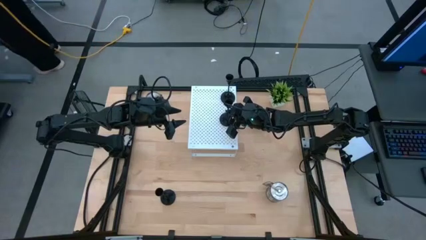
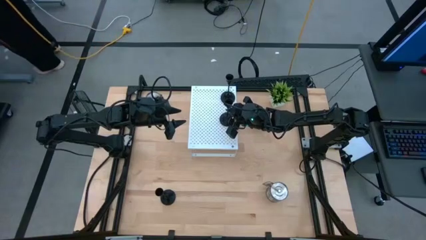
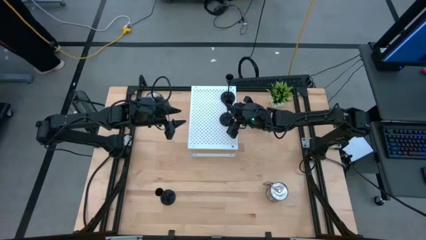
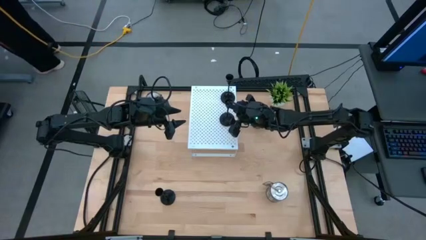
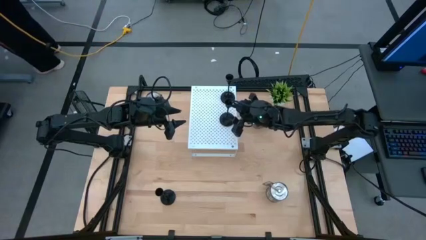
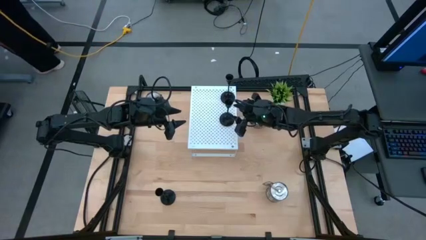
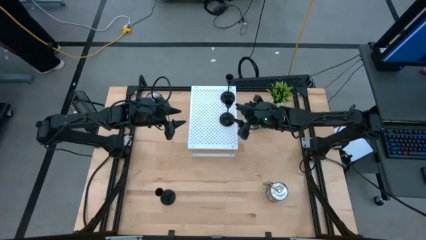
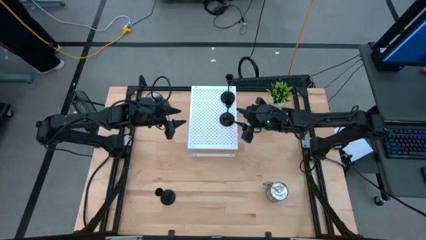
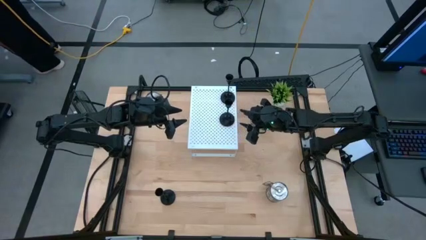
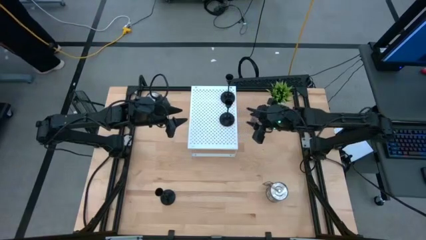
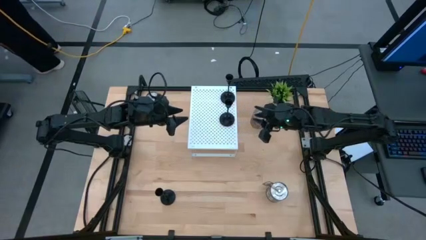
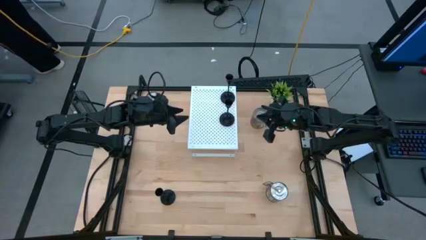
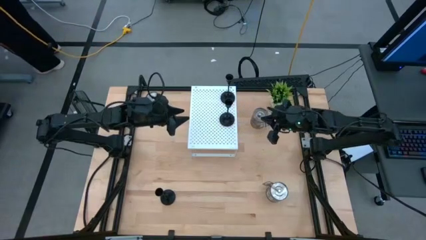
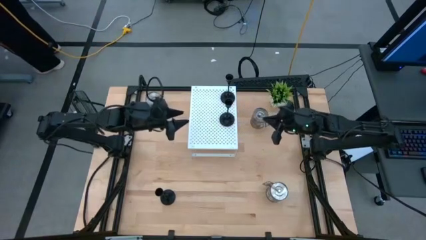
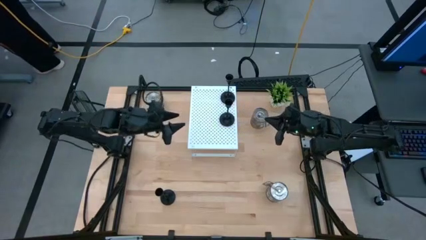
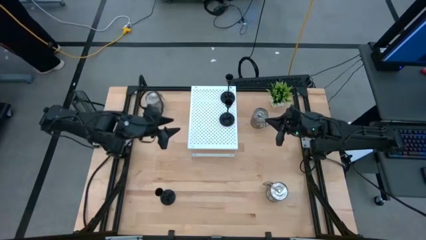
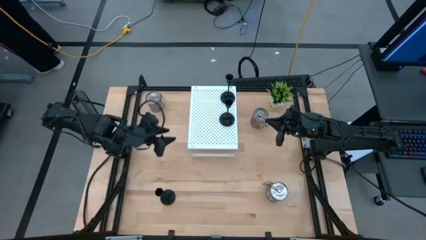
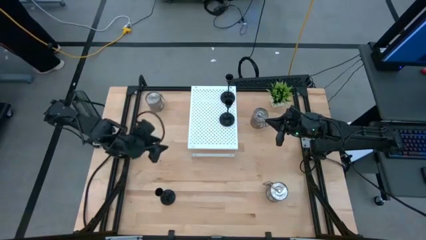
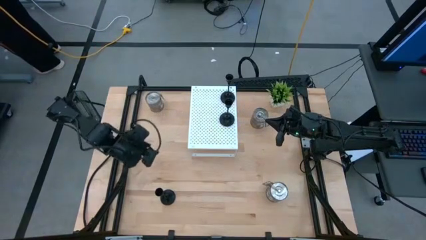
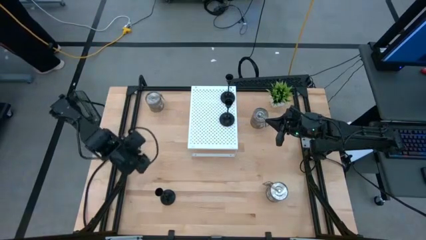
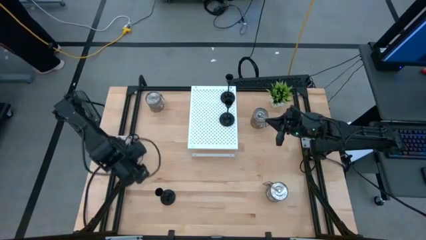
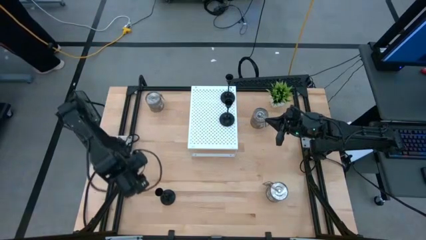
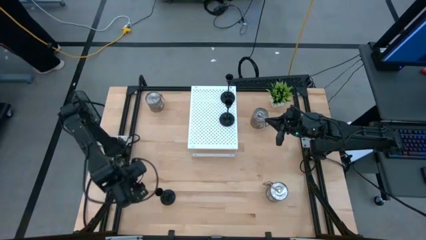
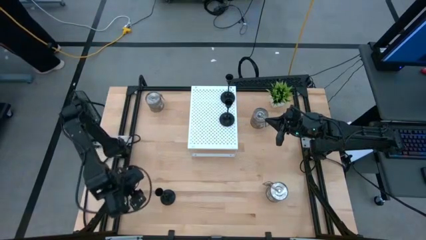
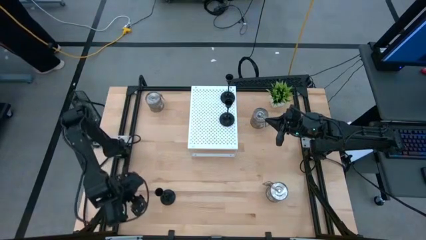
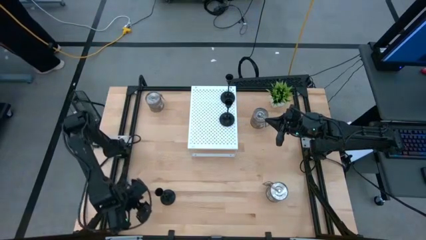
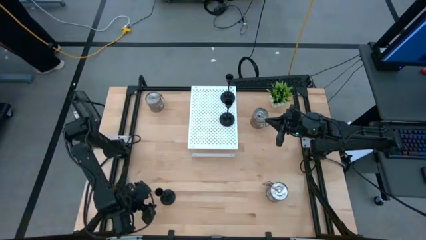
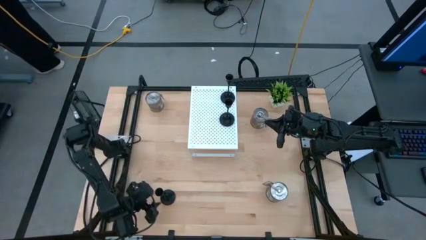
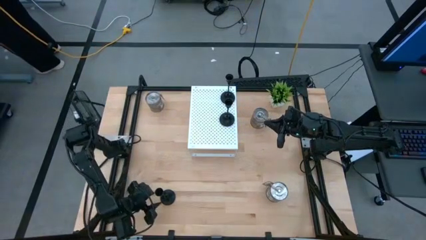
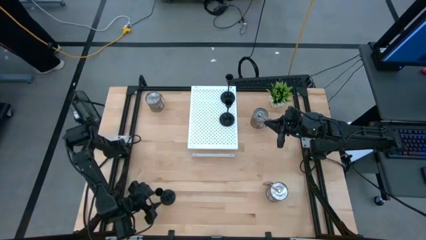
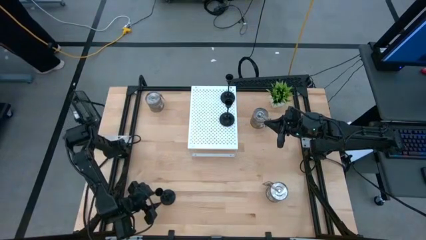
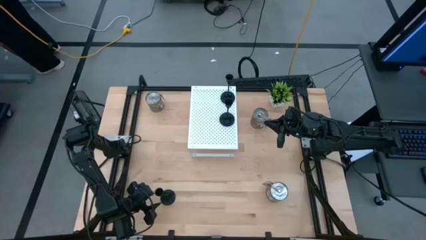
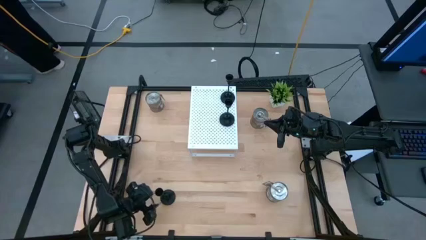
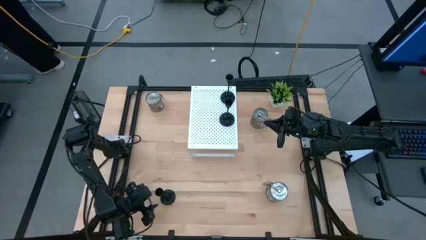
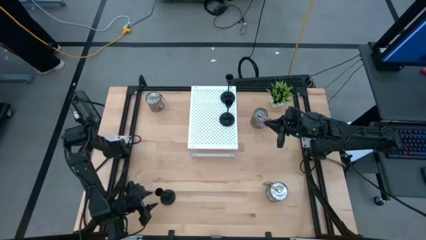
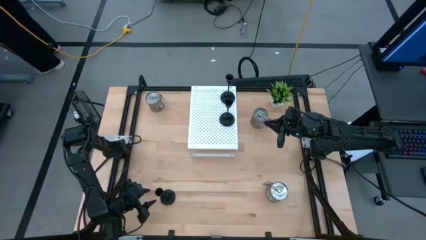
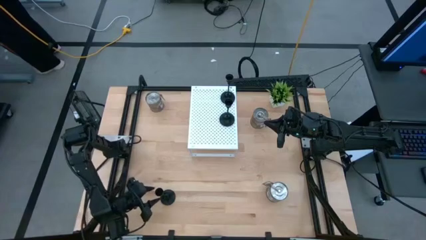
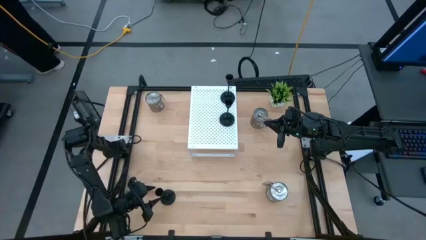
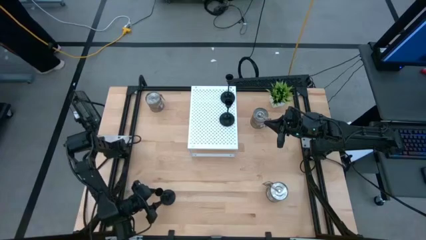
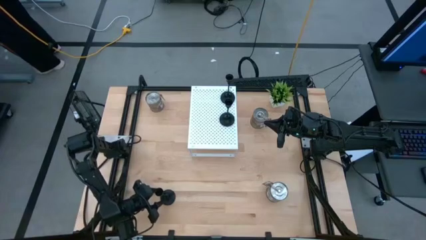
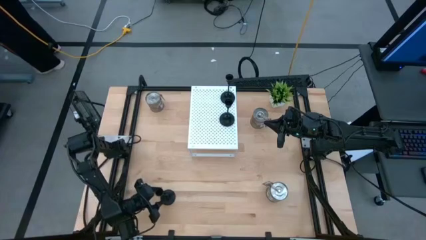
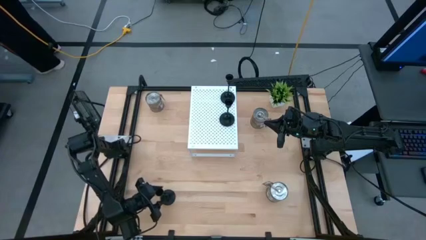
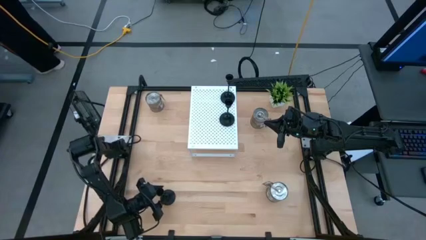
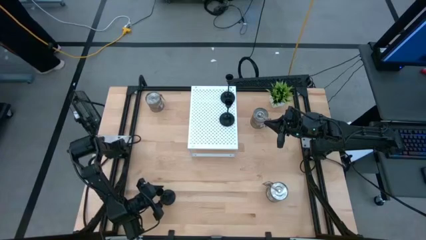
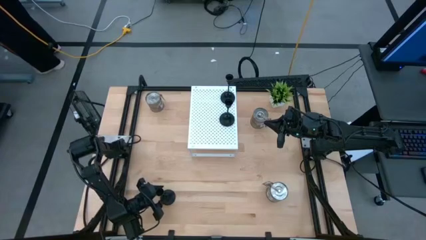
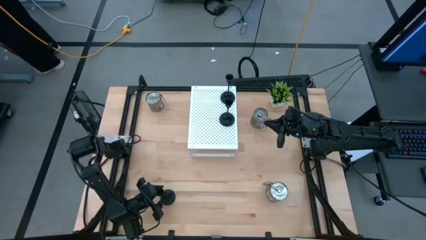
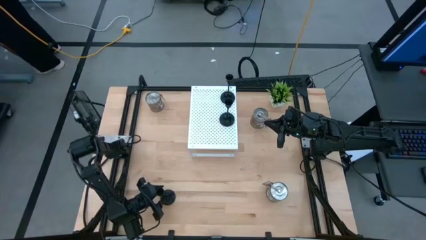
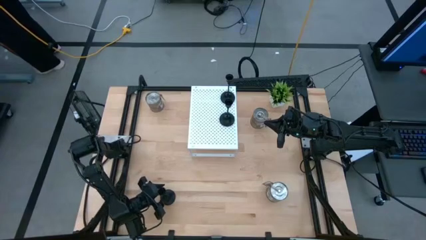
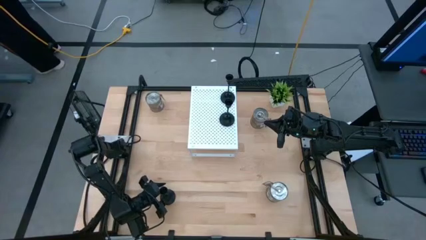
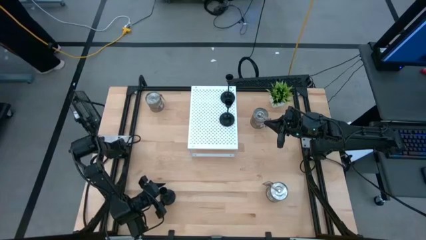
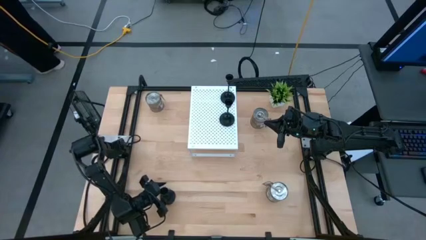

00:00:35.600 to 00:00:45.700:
Task: Pick & Place candle stick holders
Put the black candle holder on the shelf aligned with the other candle holders

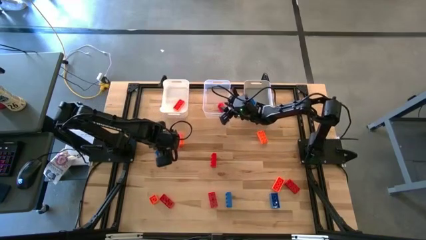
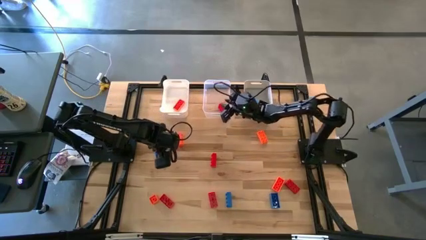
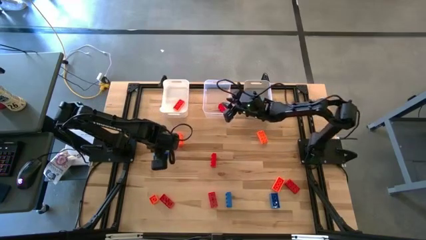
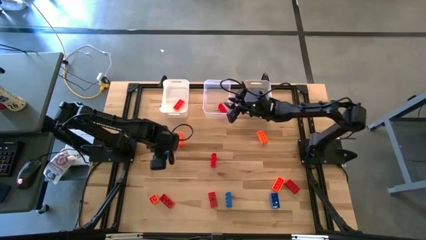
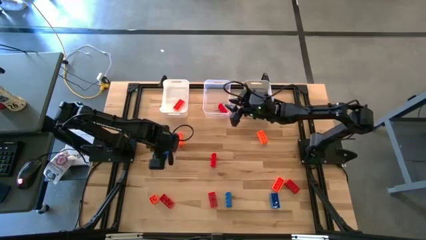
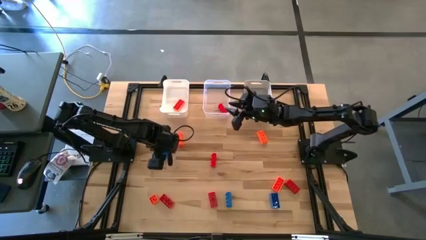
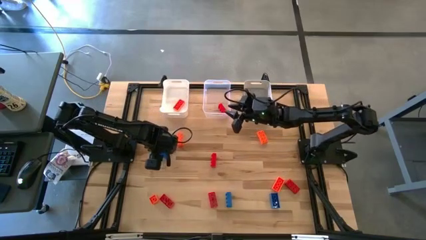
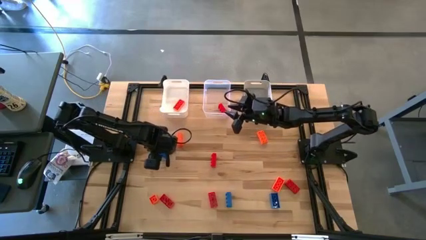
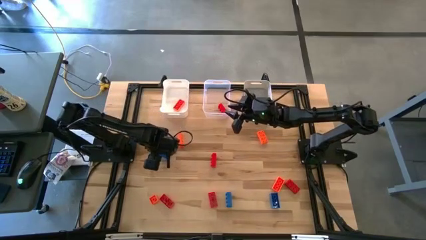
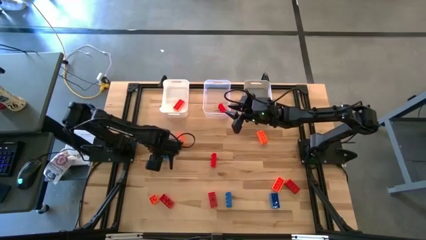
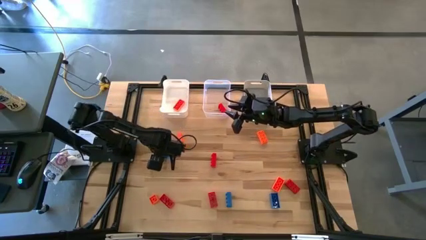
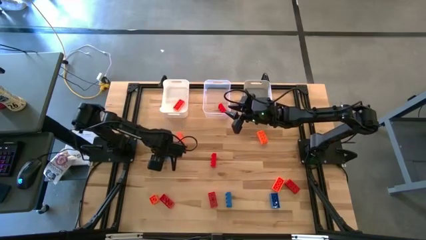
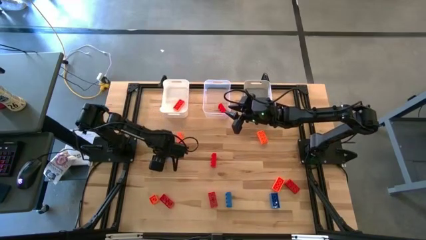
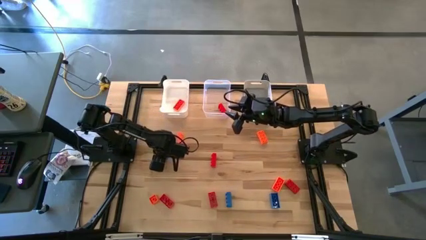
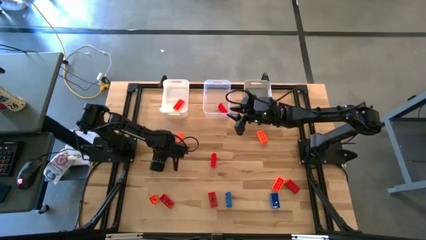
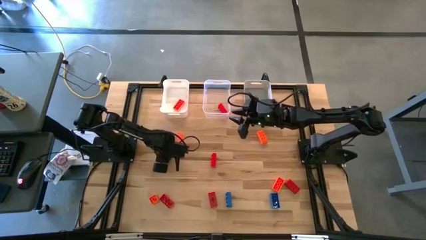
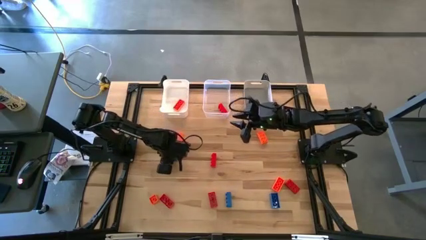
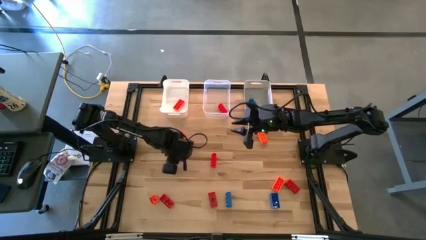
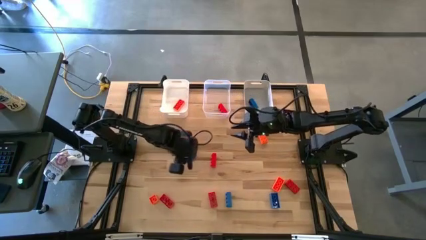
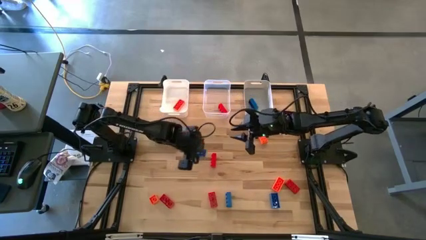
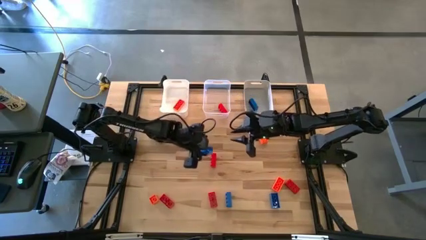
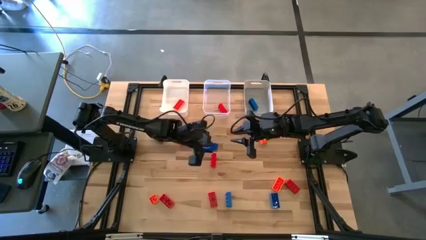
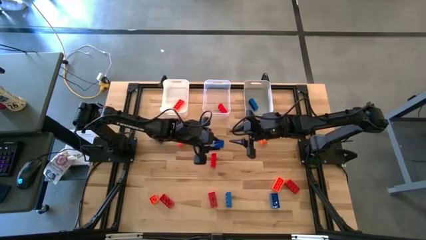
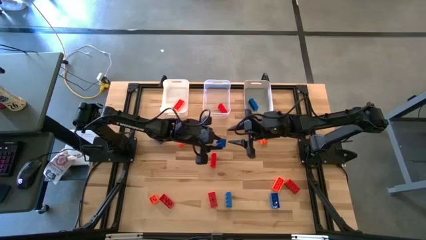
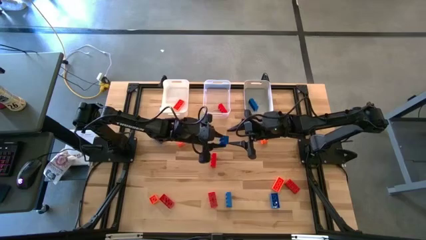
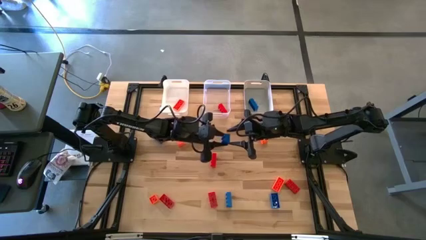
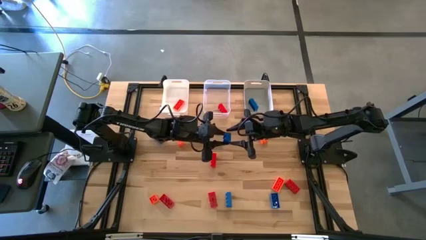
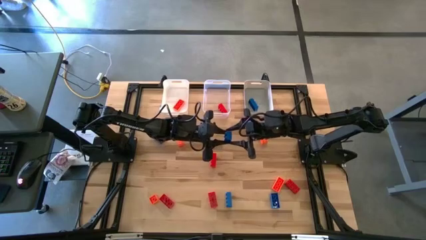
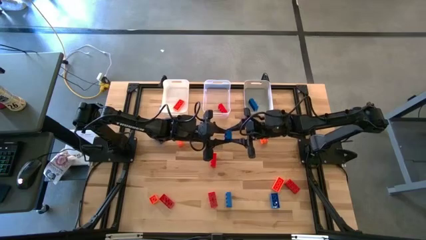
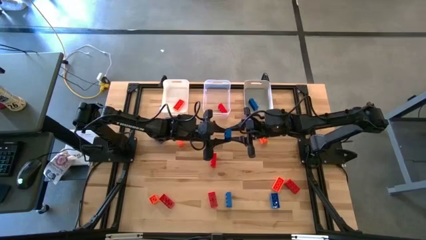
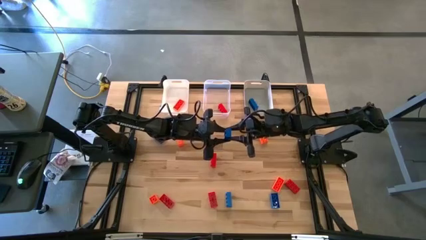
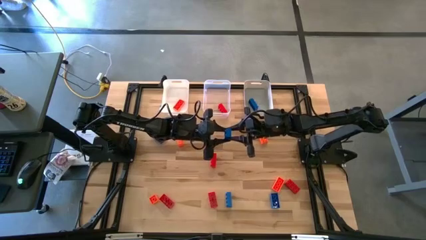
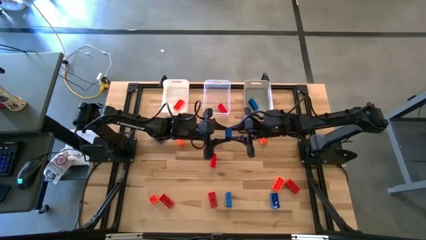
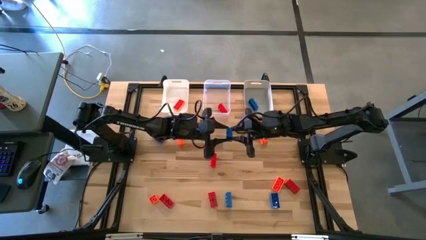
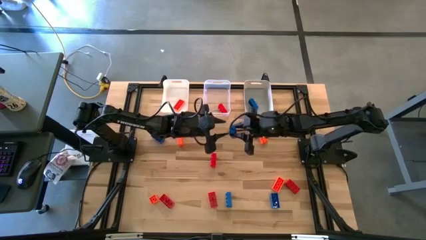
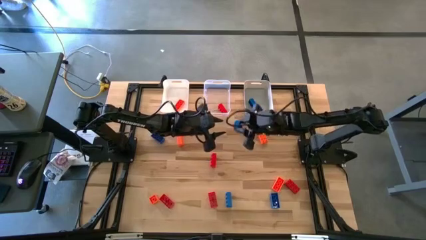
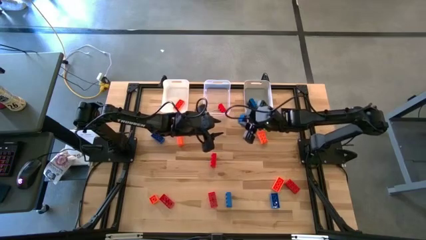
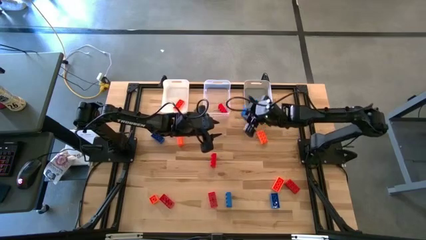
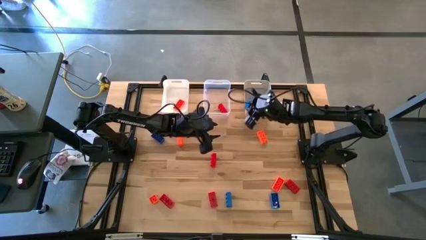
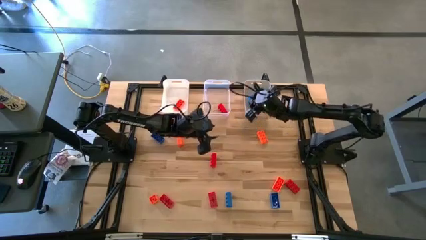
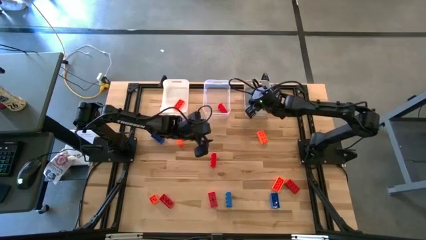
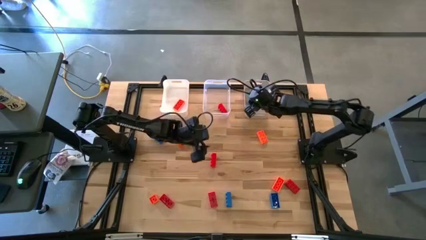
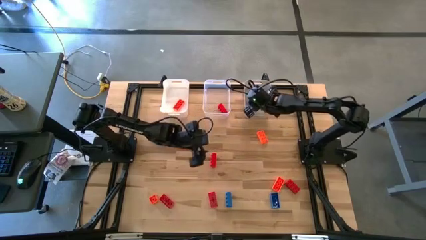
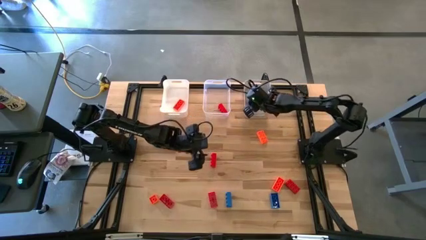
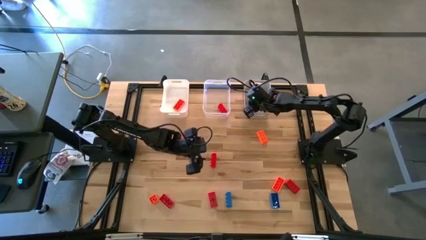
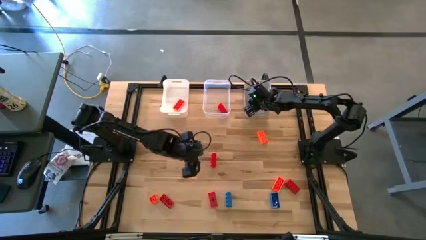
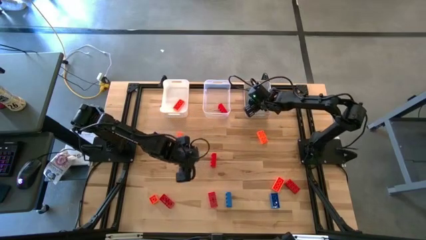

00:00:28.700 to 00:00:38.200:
Task: Sort & place blocks by color
Put the blue game piece into the gray bin
